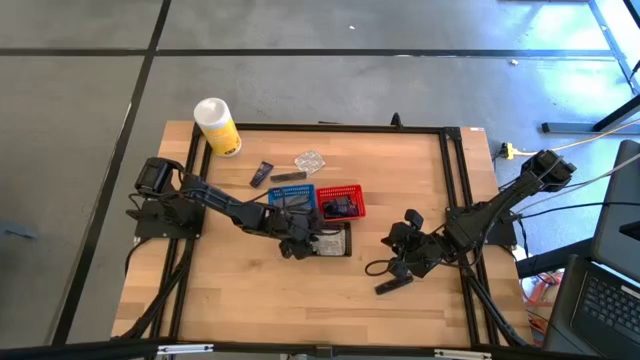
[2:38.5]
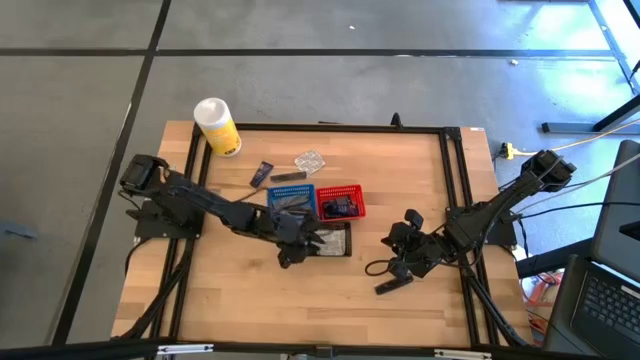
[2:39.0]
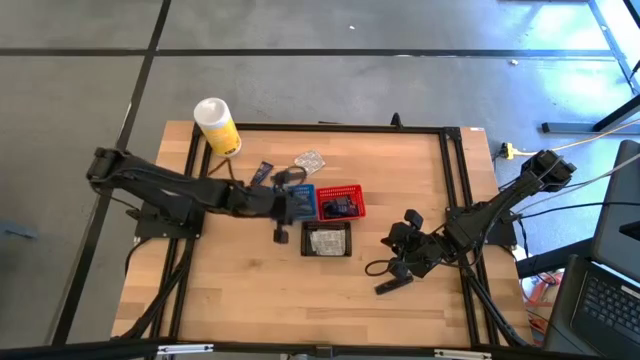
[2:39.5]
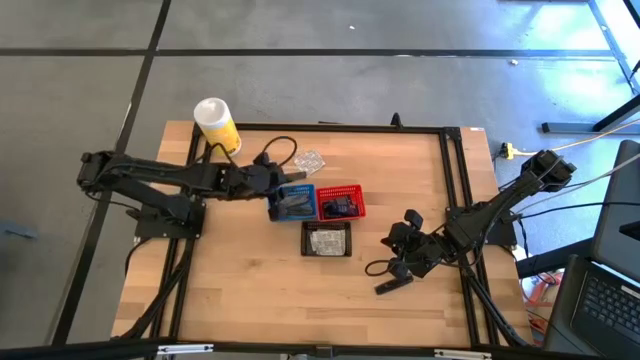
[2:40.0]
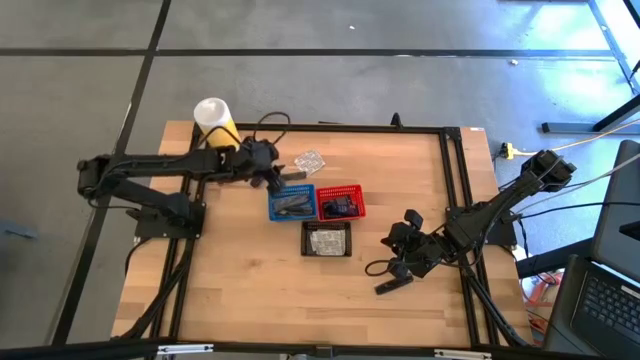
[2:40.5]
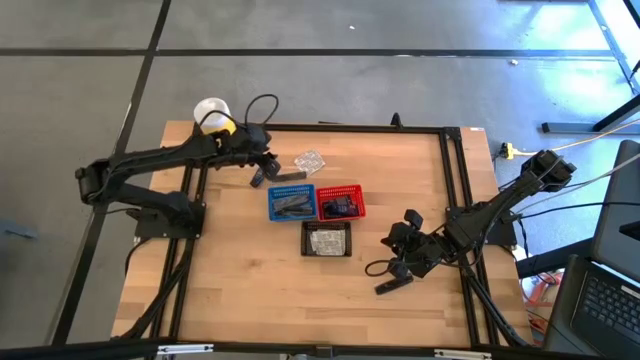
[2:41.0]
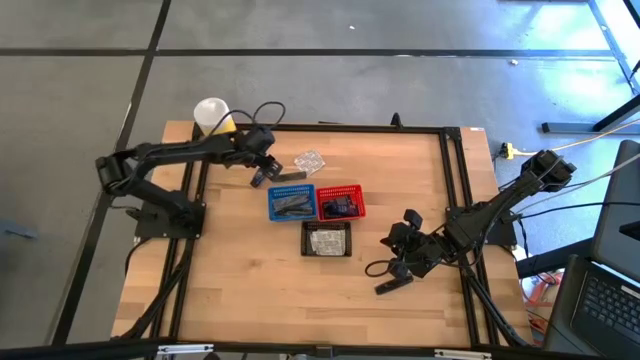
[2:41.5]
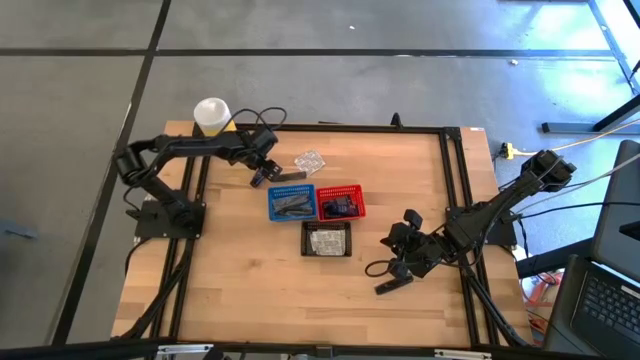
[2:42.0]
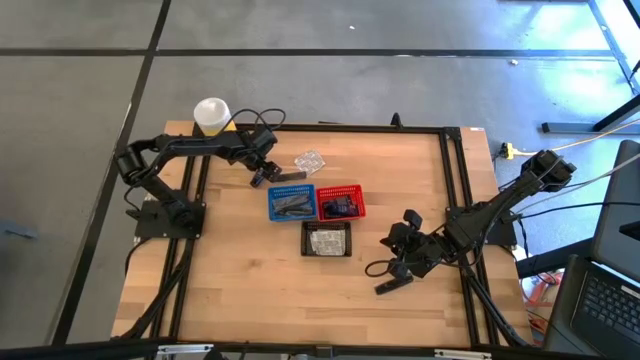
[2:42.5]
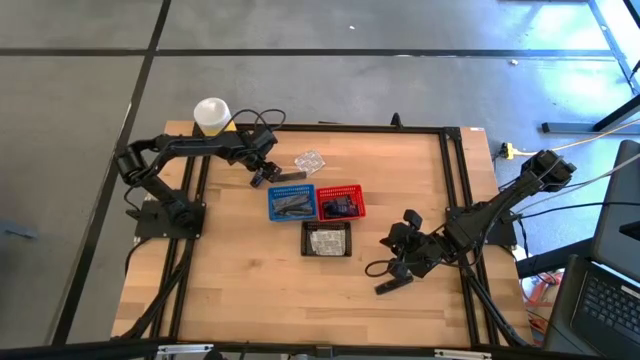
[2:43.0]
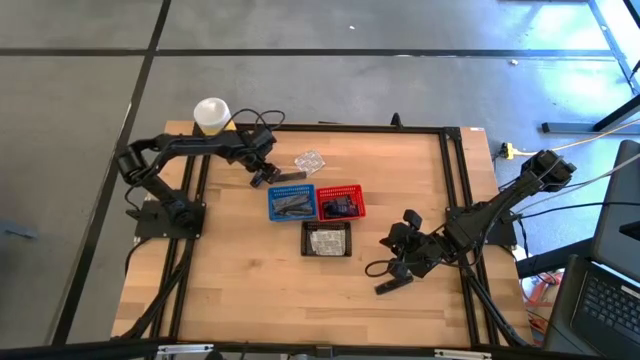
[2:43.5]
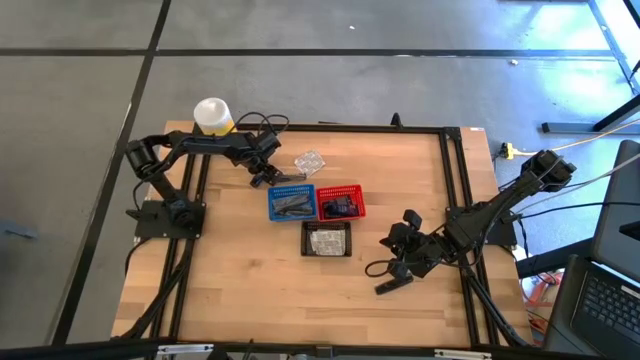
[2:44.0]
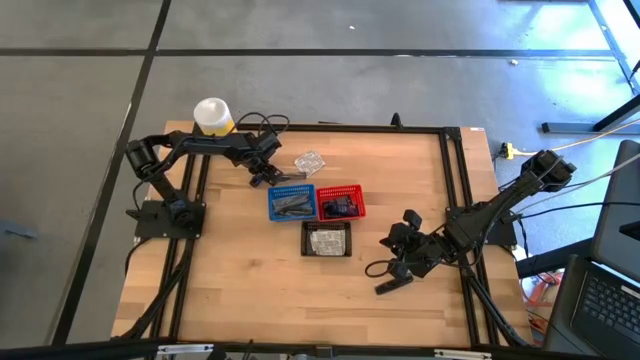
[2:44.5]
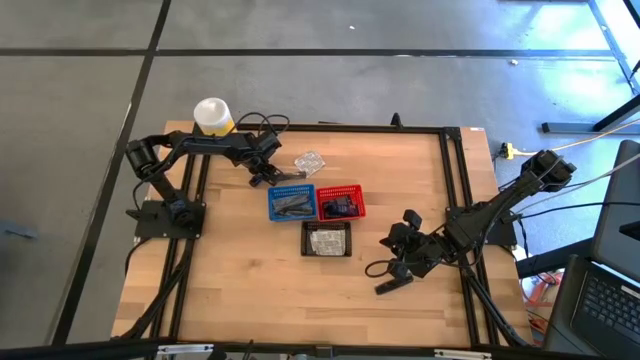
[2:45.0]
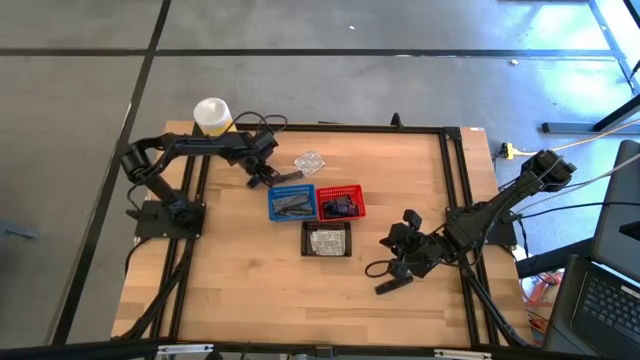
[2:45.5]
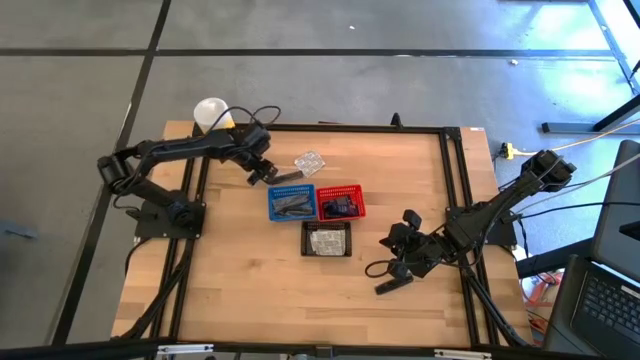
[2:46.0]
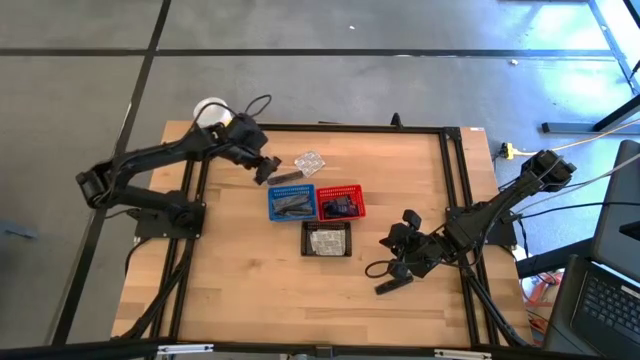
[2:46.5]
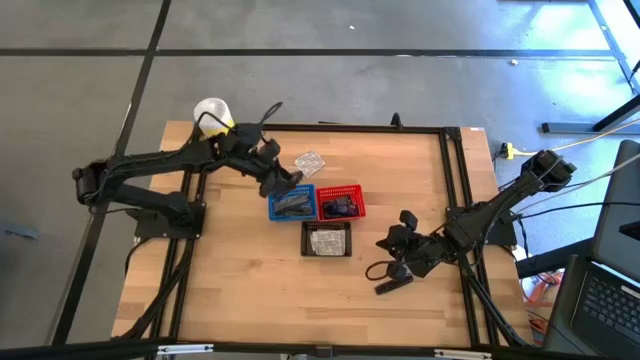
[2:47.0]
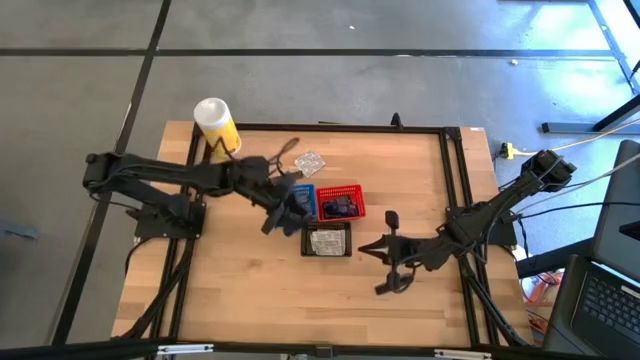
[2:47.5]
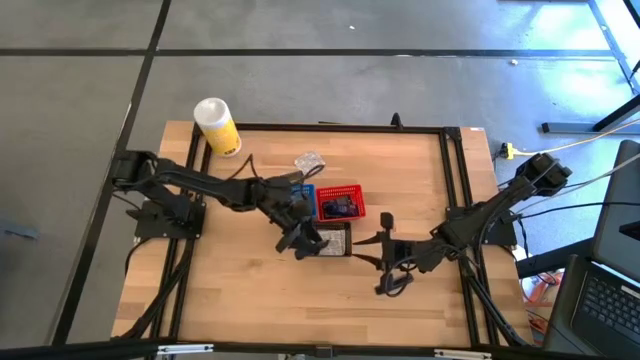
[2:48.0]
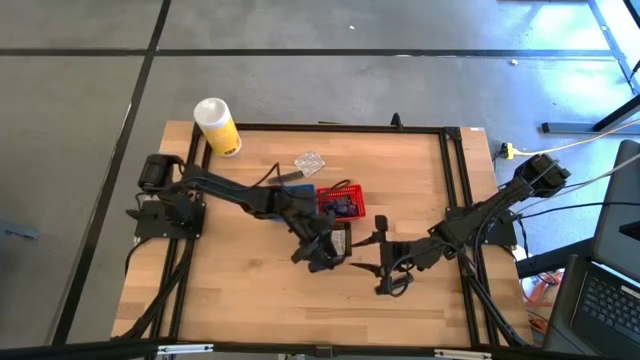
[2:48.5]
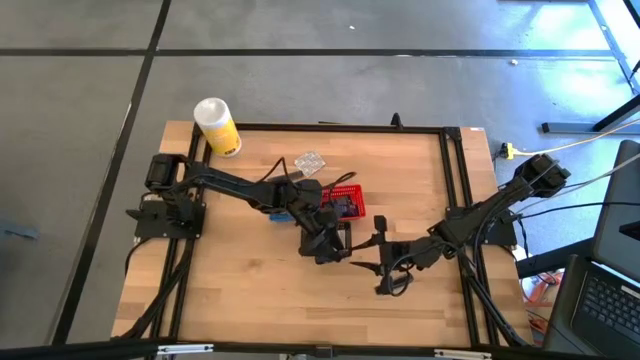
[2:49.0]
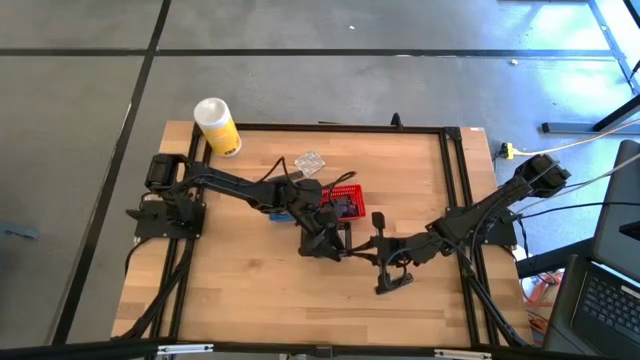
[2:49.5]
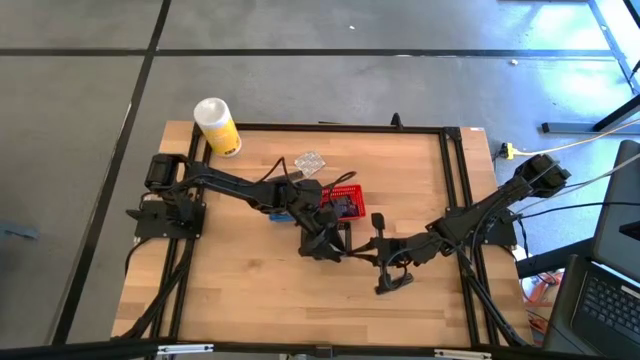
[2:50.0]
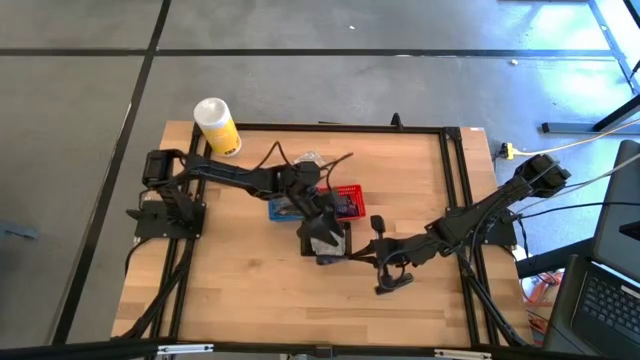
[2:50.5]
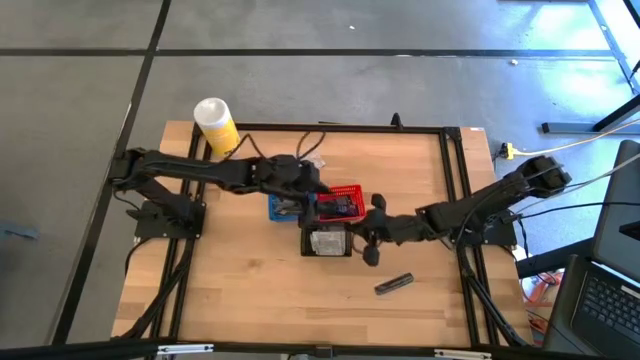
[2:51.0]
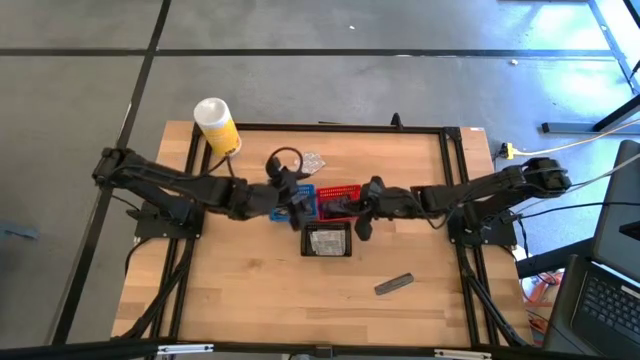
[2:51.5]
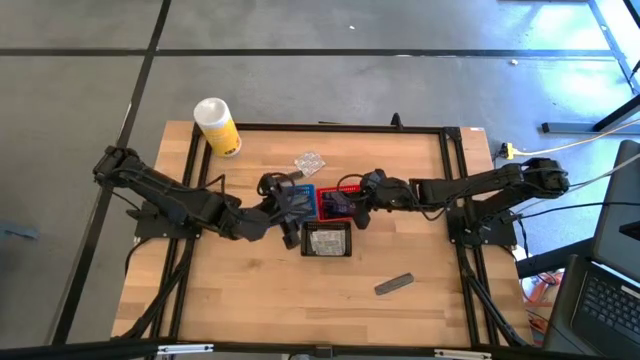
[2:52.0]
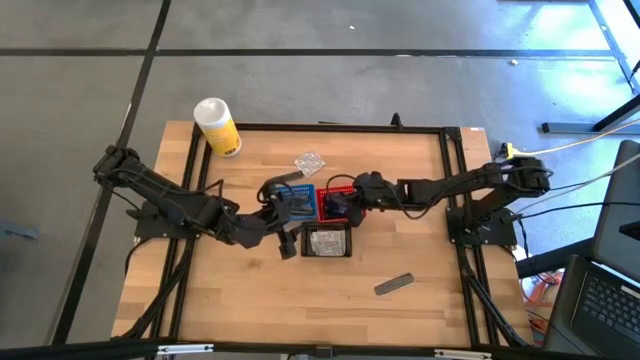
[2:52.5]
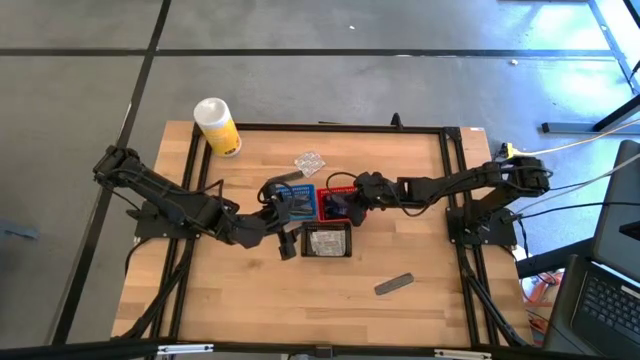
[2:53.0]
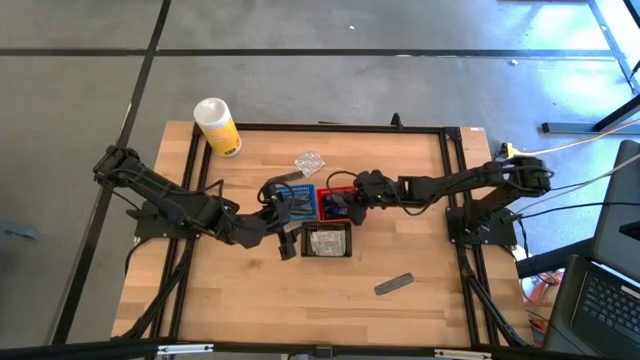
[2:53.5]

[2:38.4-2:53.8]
Task: Pick & Place Travel size toiletries
Put the blue shaver cream into the red bin

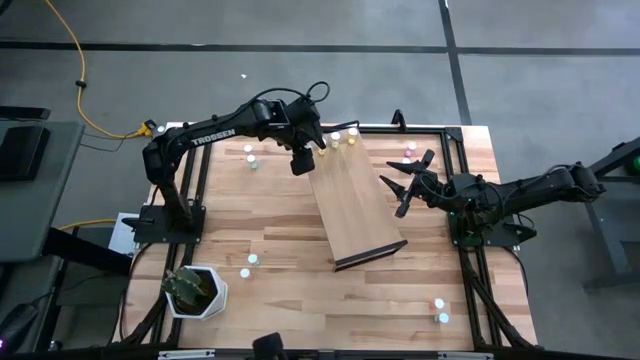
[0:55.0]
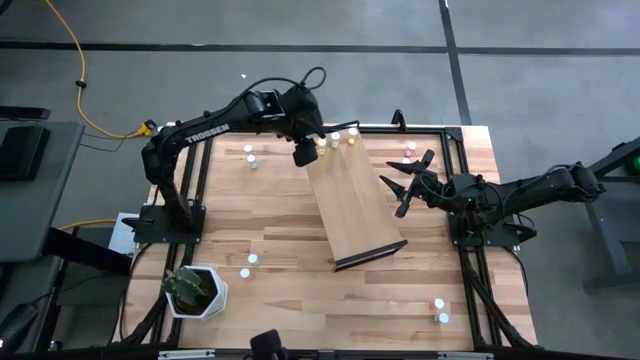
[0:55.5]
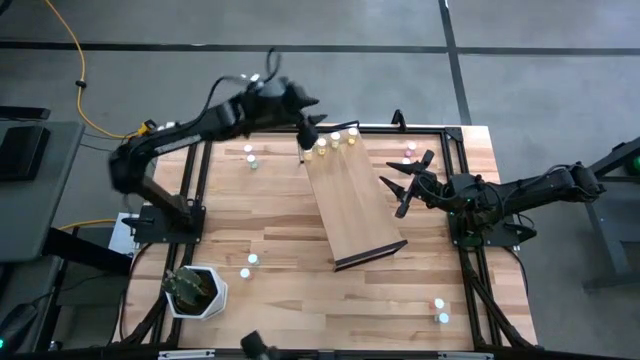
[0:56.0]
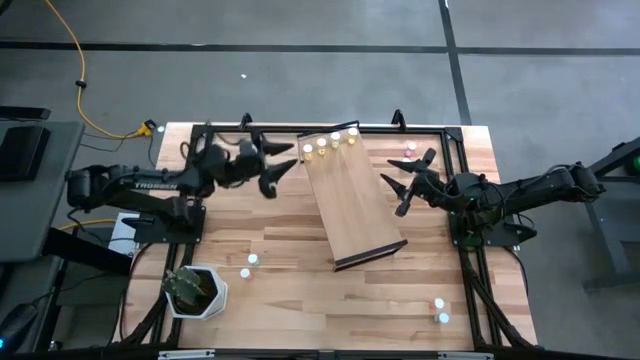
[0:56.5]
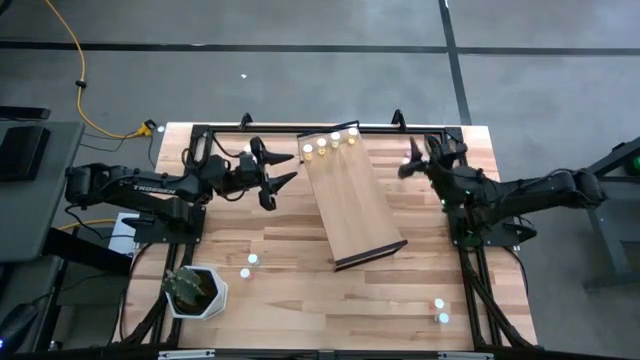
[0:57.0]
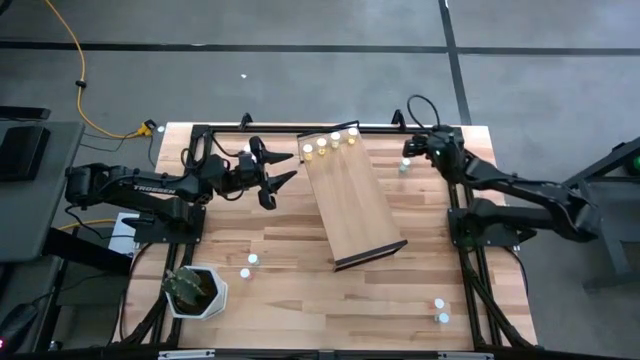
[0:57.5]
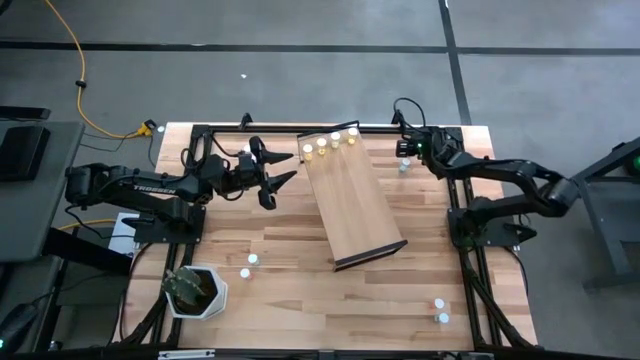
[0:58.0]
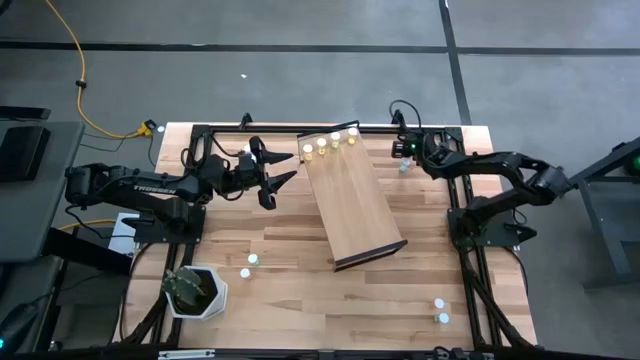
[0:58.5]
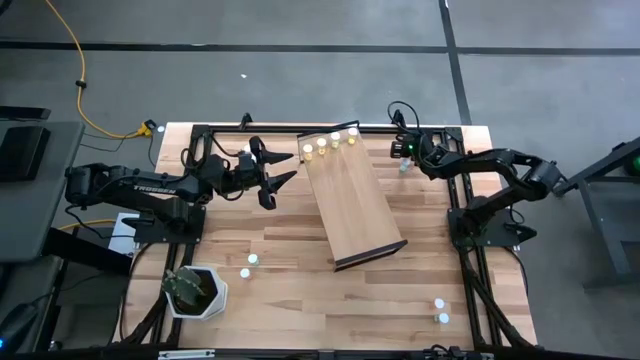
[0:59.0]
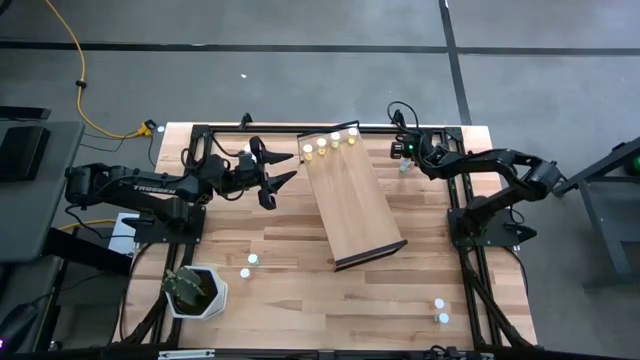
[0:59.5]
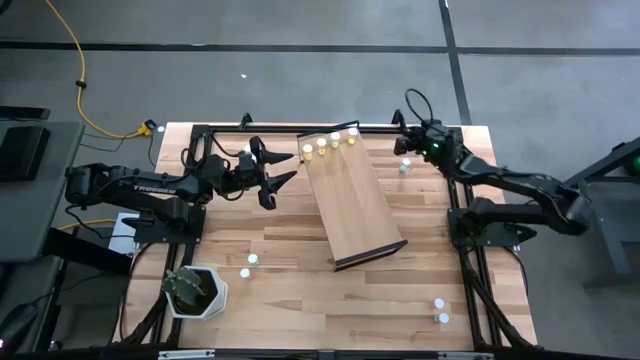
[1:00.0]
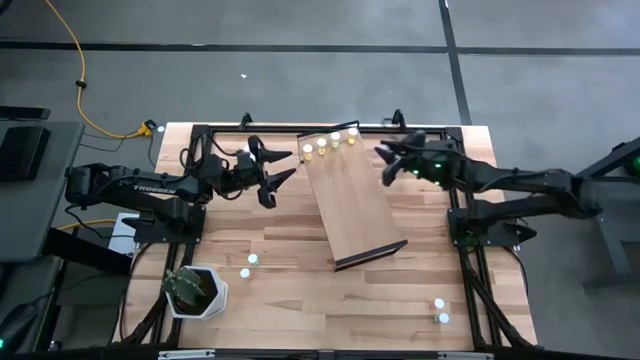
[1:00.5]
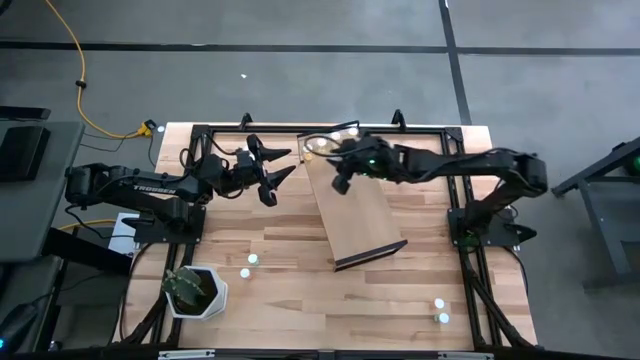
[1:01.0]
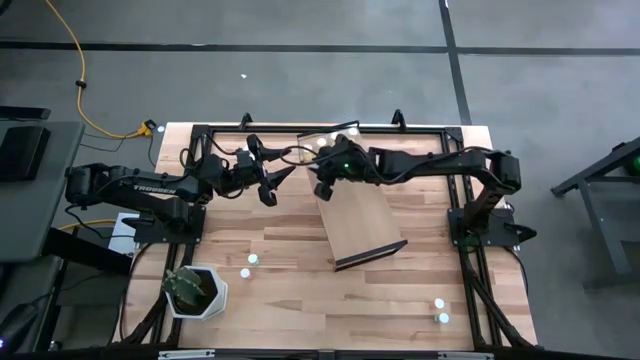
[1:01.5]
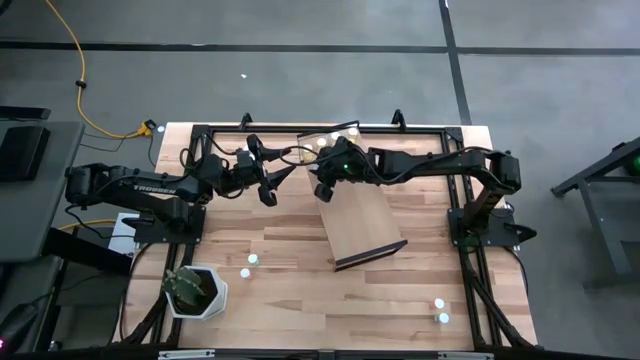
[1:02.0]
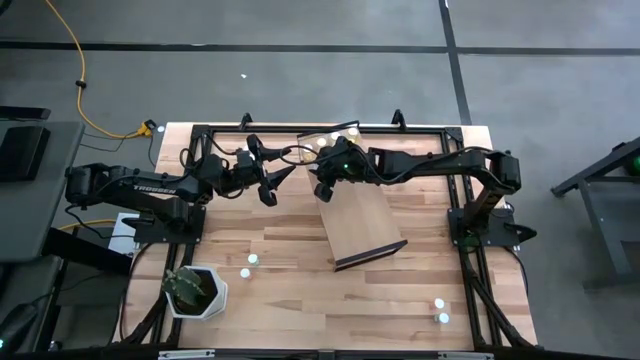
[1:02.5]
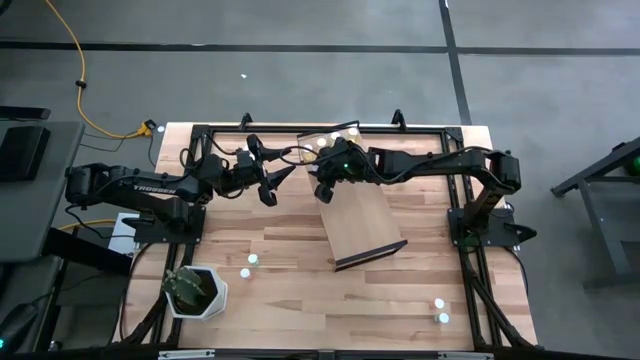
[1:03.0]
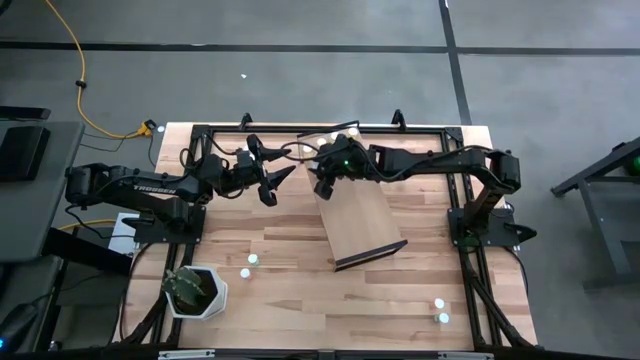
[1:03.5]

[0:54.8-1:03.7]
Task: Pick and place medicine bottles onto shelf by color
Put the purple pill bottle on the shelf
